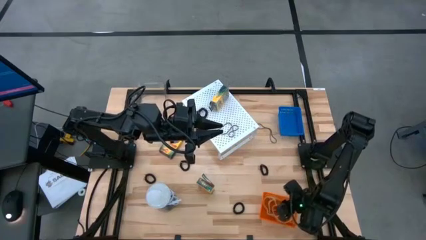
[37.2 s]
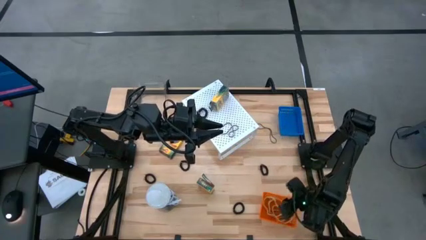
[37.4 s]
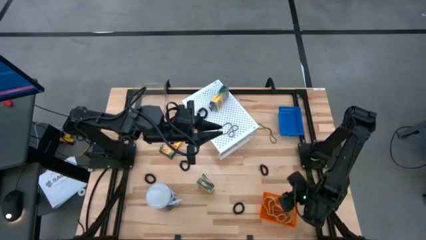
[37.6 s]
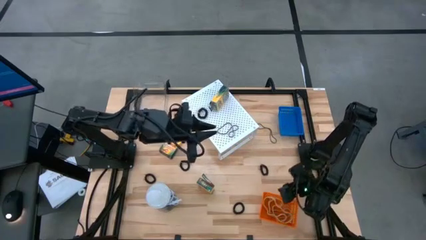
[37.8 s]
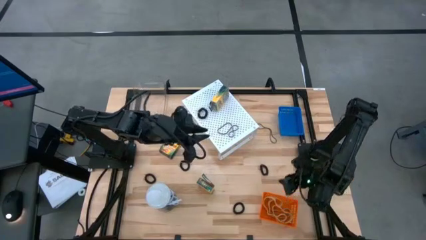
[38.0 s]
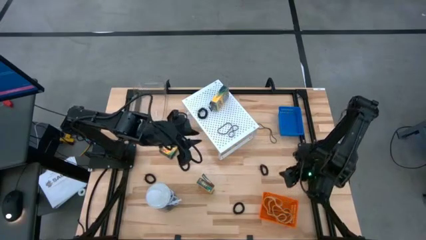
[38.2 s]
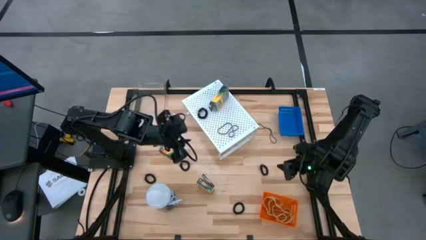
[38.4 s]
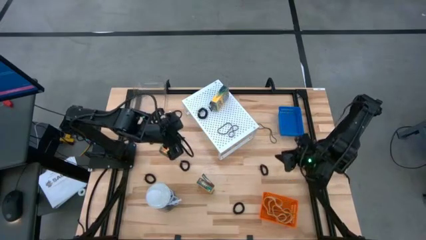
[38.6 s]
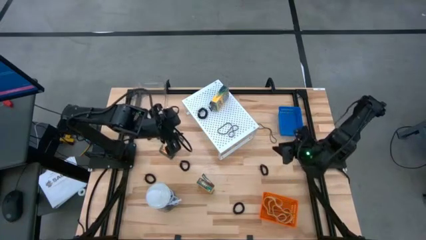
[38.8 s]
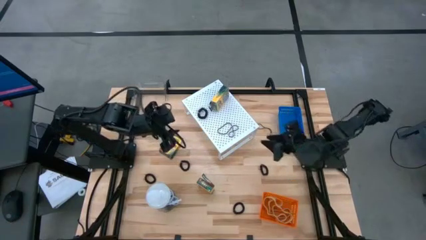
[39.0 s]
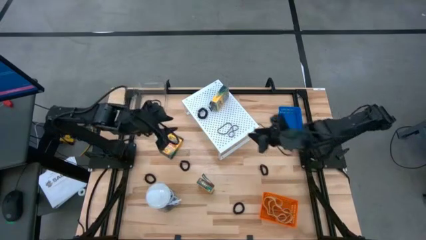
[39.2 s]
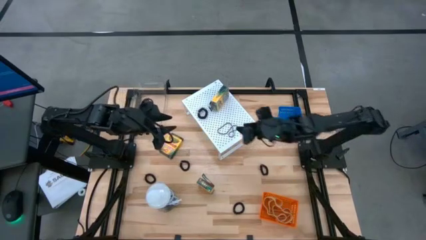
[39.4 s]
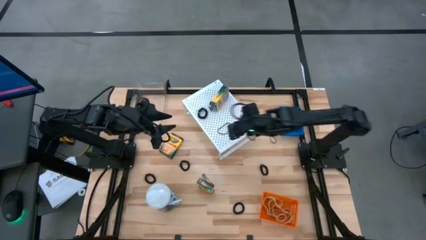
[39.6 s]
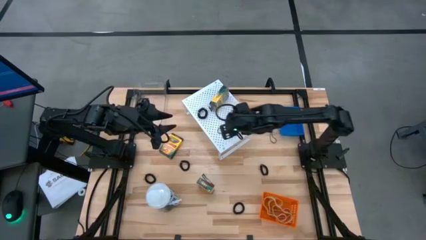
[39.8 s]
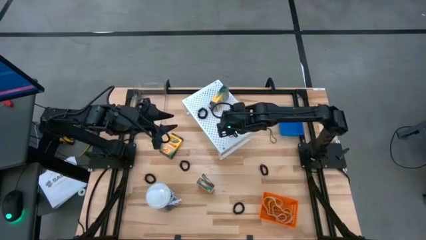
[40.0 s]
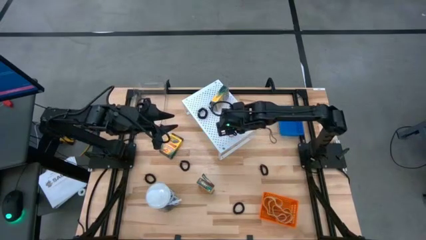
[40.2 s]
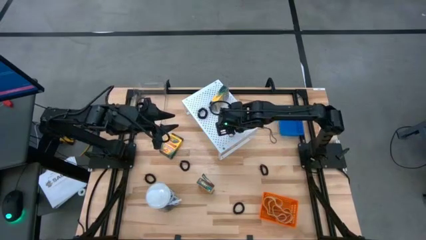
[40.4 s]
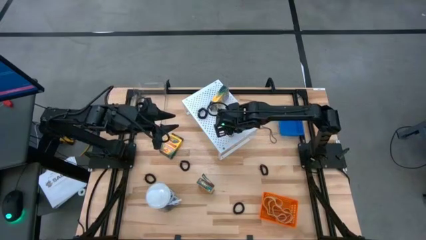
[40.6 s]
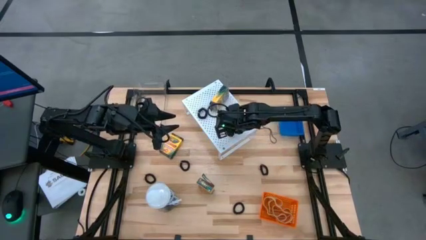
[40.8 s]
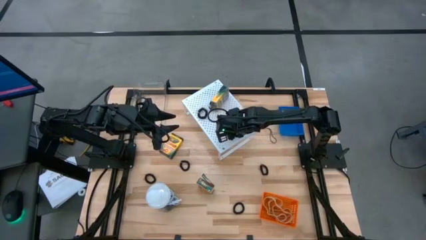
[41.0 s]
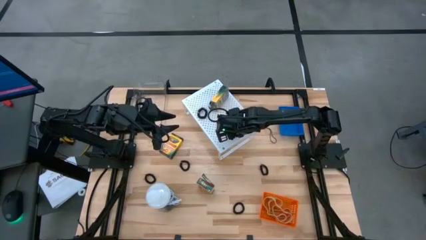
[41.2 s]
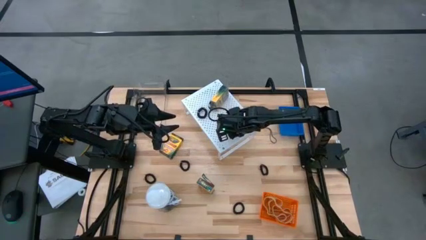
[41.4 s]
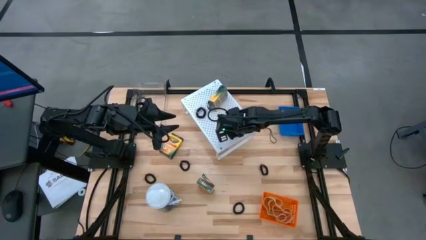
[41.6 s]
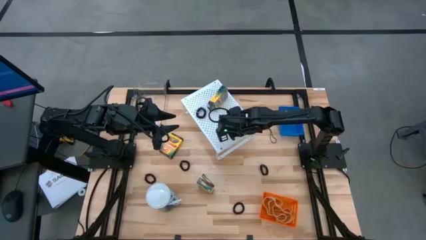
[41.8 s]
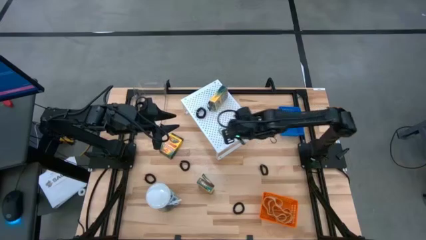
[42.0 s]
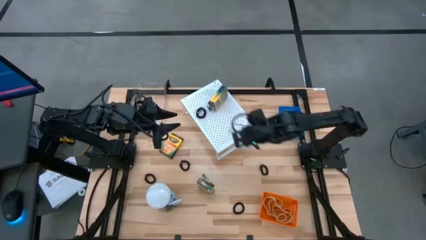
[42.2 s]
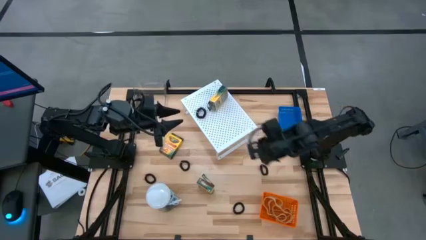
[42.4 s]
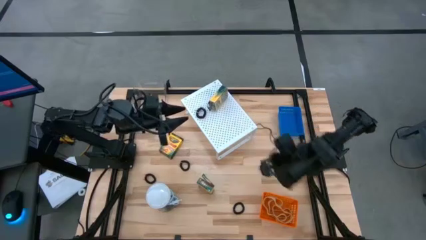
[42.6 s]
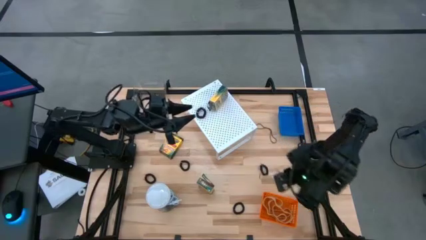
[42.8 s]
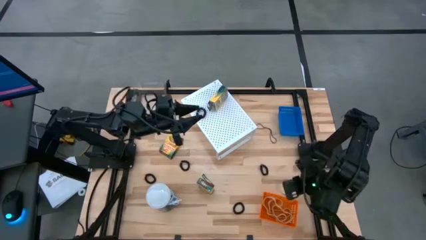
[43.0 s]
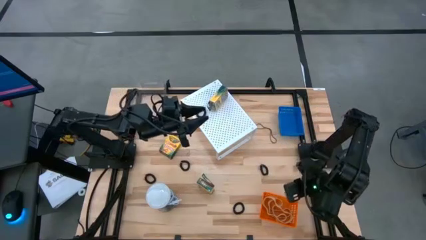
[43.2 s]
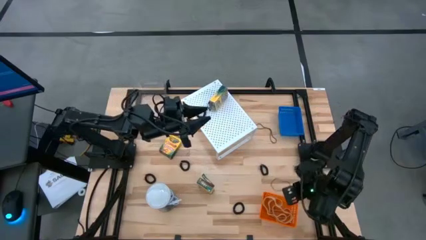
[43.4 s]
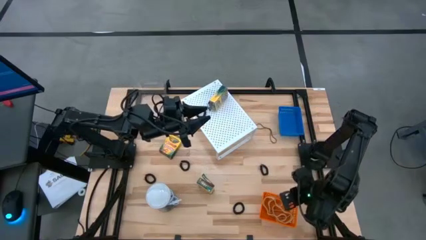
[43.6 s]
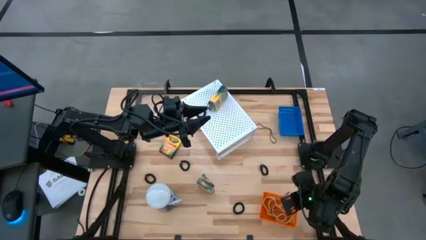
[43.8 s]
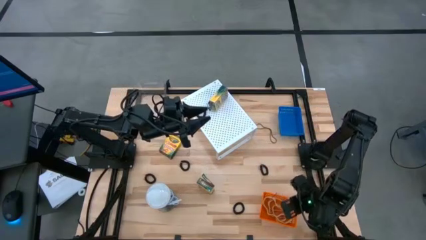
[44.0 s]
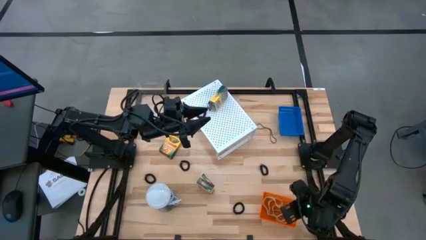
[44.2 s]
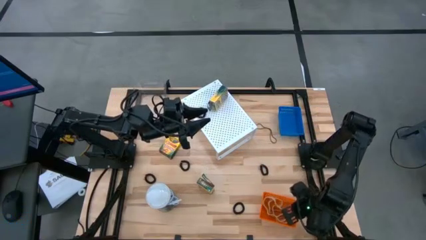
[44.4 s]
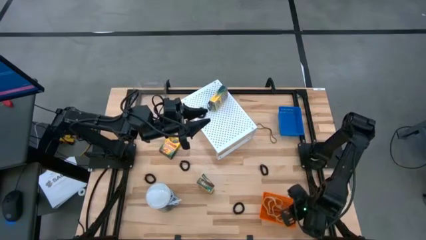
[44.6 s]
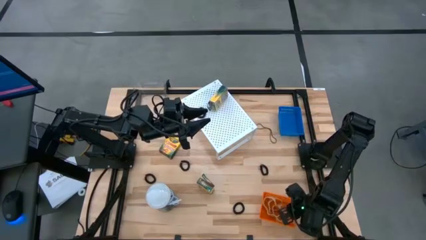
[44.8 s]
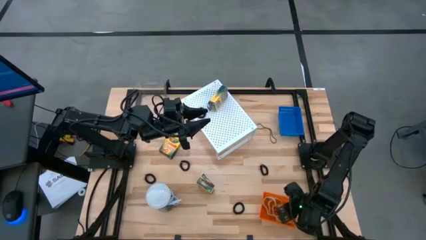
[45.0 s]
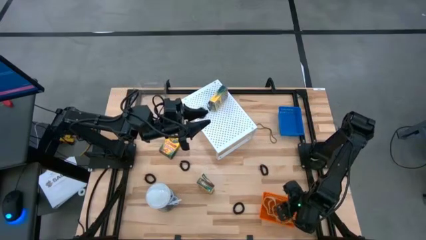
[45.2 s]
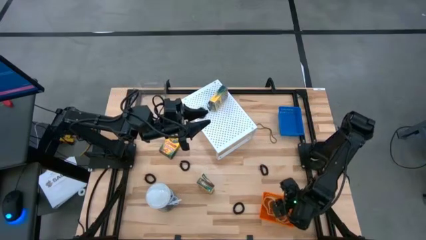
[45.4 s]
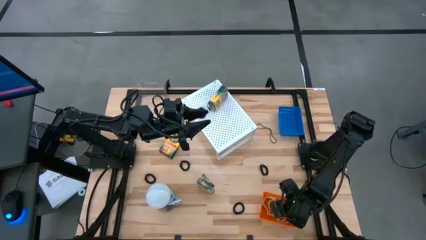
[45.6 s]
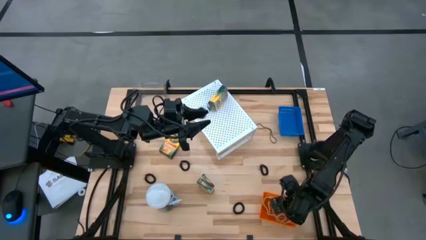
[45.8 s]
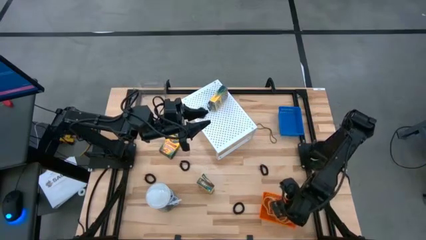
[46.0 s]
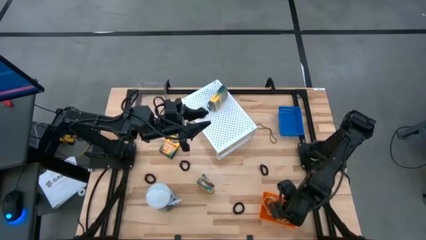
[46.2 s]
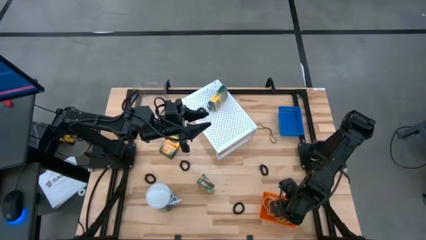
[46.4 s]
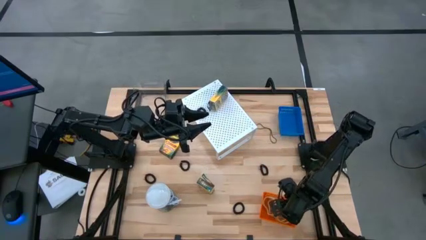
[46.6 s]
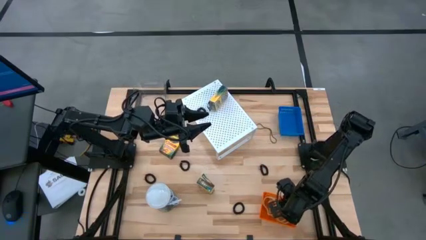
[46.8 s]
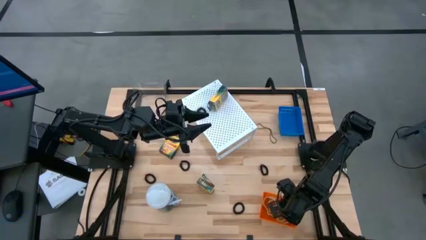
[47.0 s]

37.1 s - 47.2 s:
Task: Pick & Place Office Desk Supplies
Put the black rubber band into the orange bin

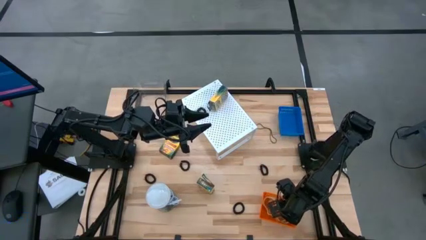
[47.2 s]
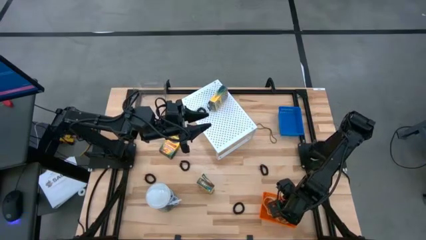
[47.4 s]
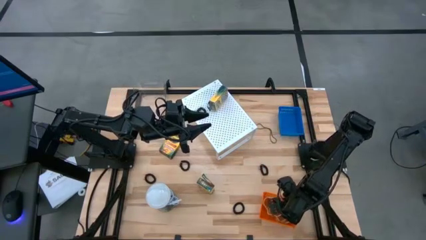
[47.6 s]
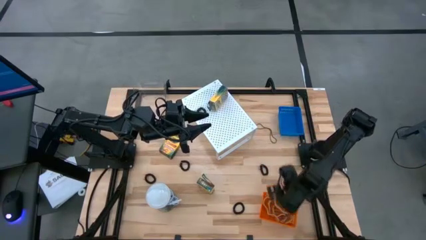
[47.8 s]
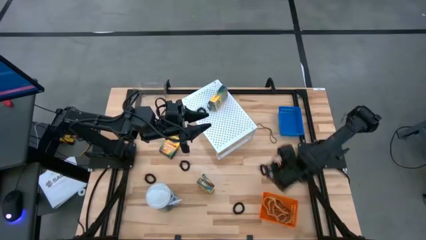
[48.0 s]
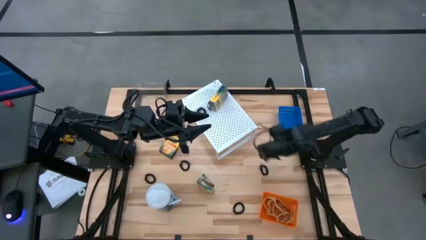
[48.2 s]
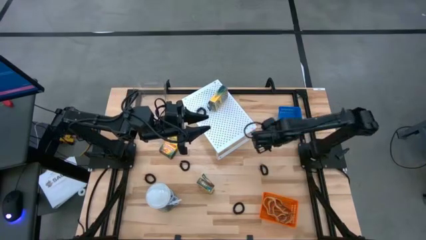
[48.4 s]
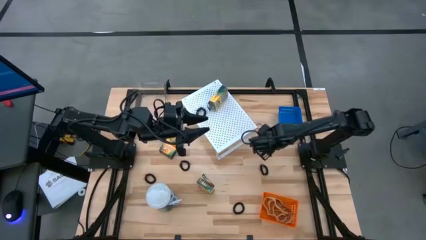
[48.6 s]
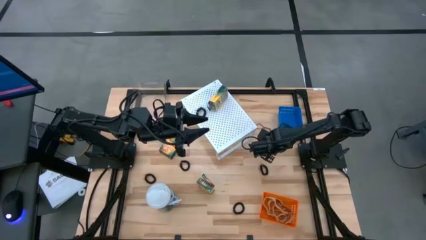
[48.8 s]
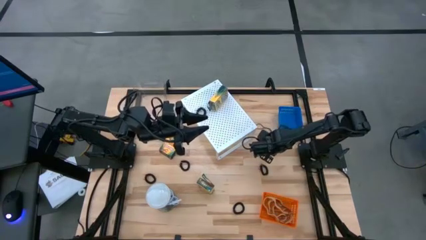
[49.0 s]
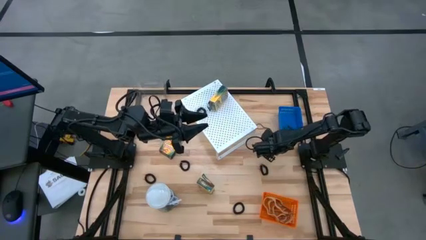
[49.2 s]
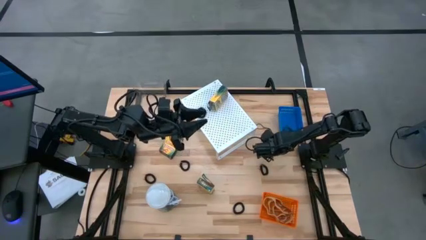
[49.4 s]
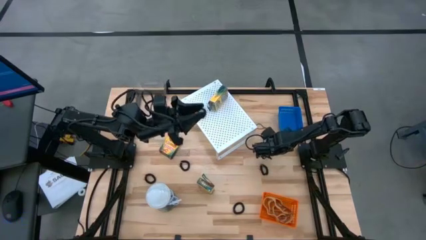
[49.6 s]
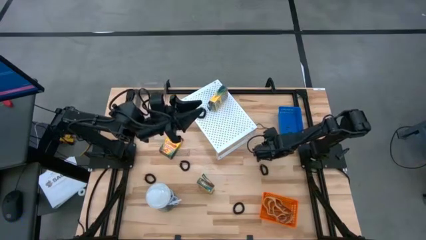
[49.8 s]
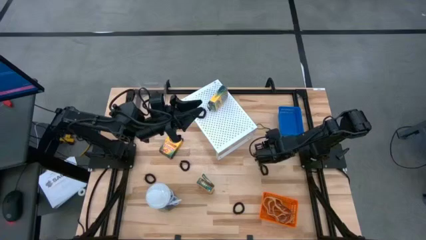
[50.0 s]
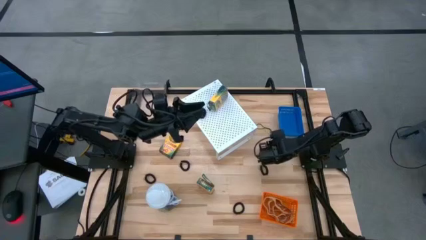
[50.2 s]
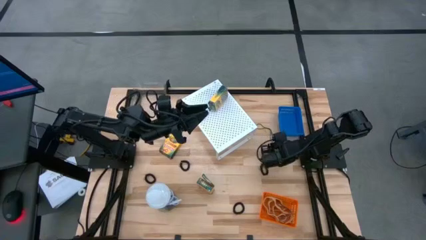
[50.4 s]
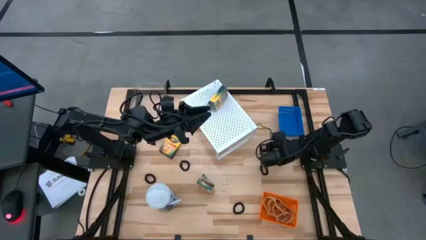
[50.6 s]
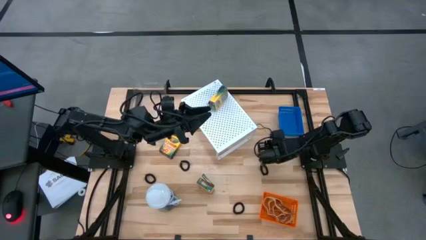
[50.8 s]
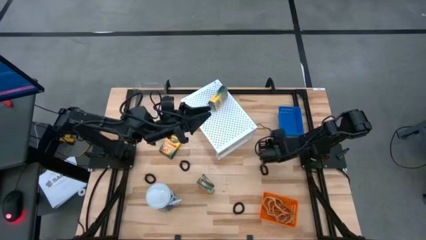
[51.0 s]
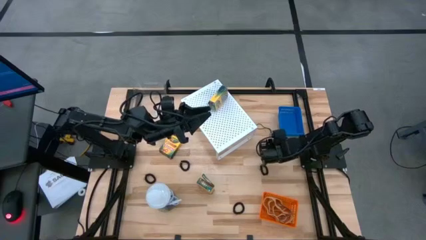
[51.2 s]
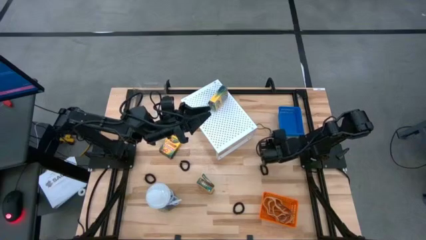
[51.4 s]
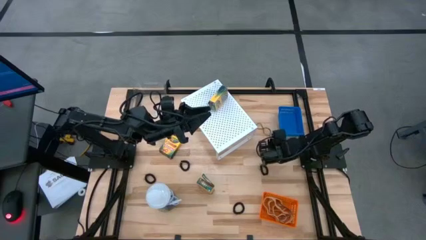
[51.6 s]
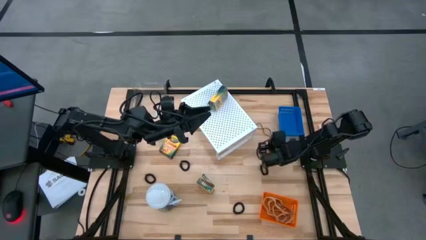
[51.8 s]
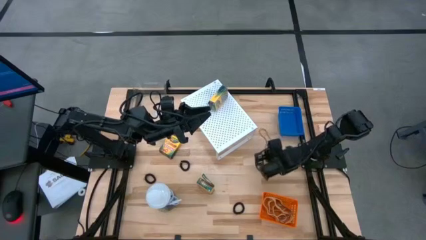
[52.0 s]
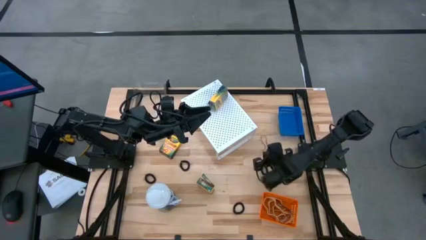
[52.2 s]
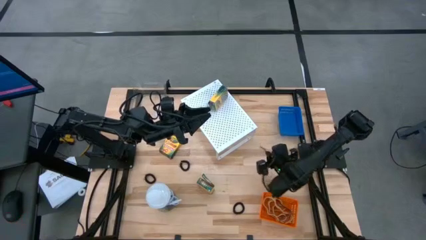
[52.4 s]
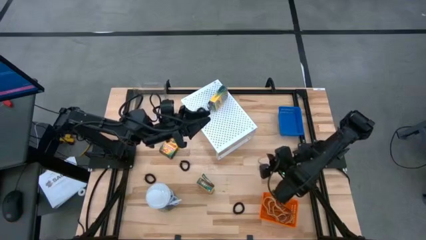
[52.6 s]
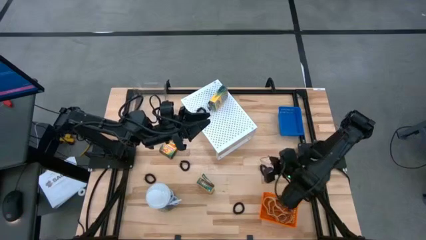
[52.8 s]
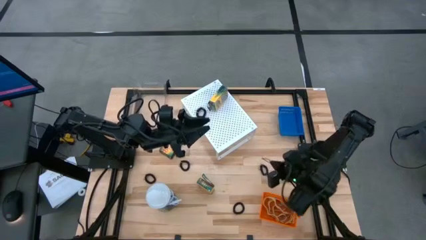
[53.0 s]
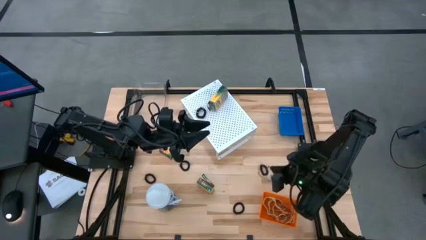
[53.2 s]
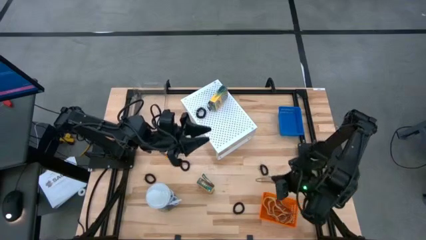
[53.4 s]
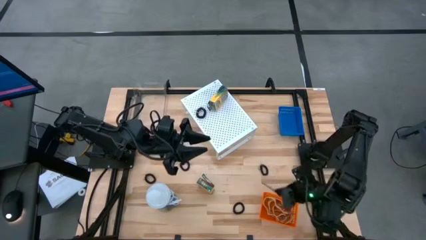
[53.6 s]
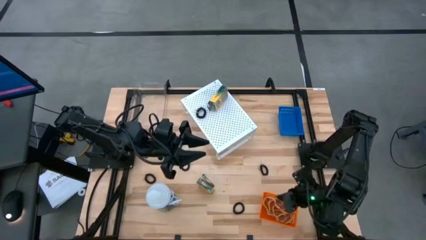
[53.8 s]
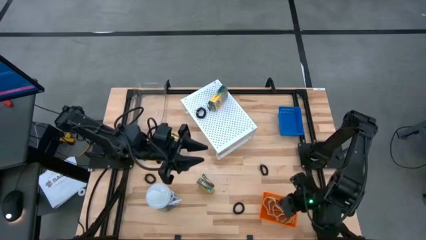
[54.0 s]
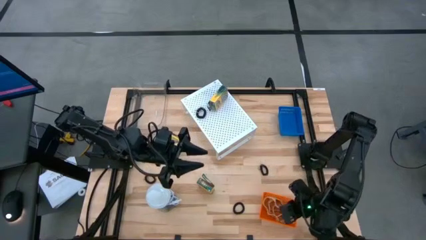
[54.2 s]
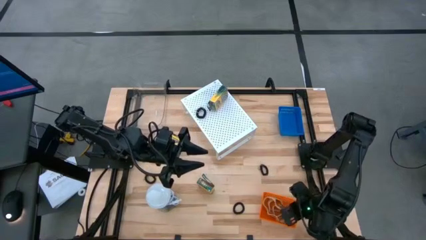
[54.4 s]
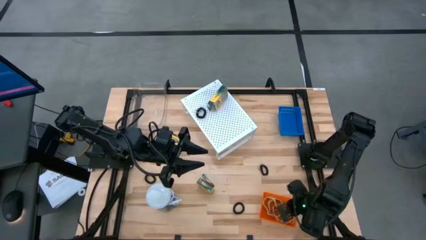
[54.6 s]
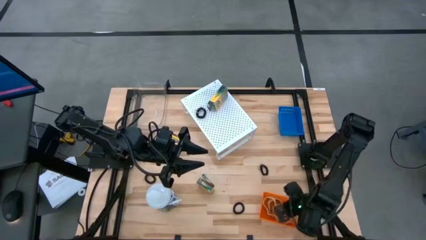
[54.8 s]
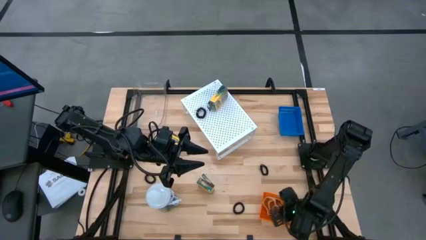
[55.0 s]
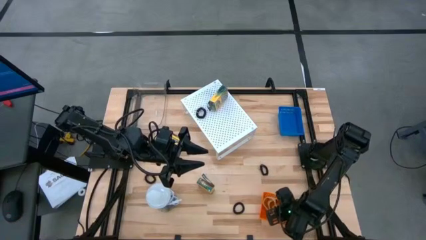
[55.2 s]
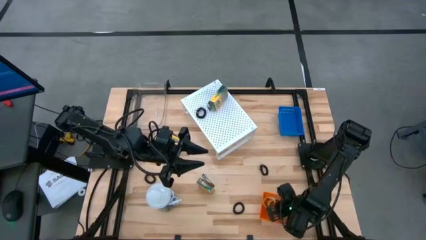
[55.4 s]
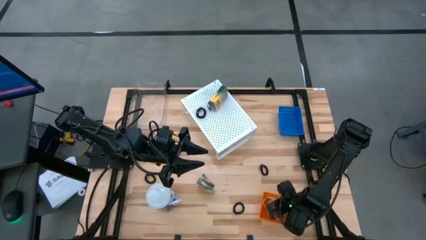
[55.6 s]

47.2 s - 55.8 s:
Put the black rubber band into the orange bin
